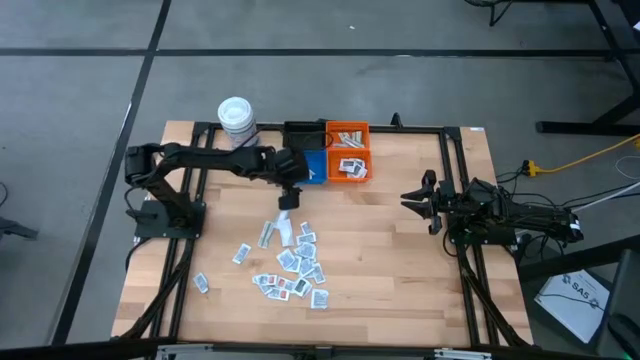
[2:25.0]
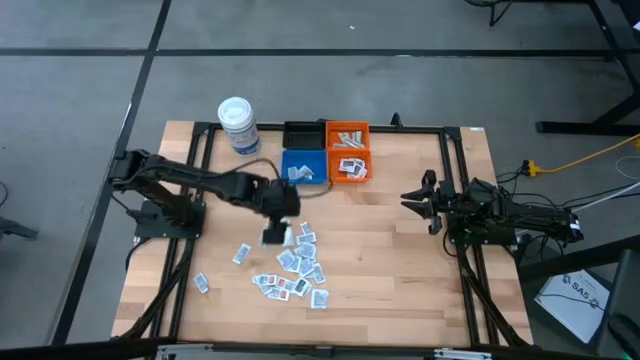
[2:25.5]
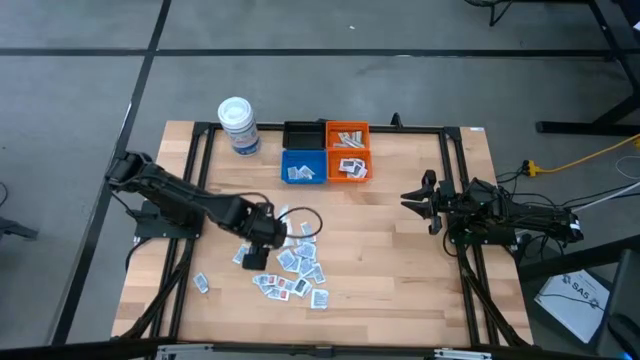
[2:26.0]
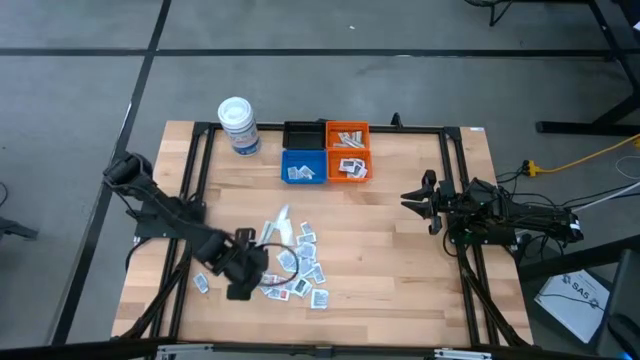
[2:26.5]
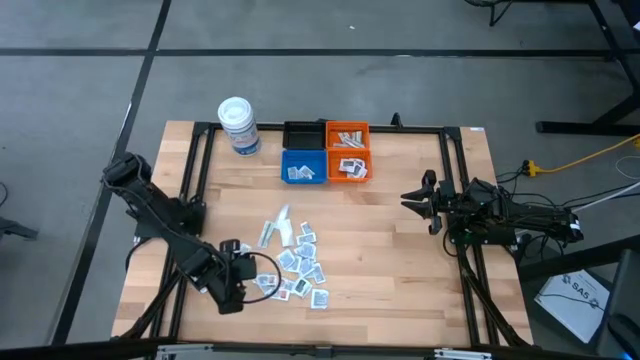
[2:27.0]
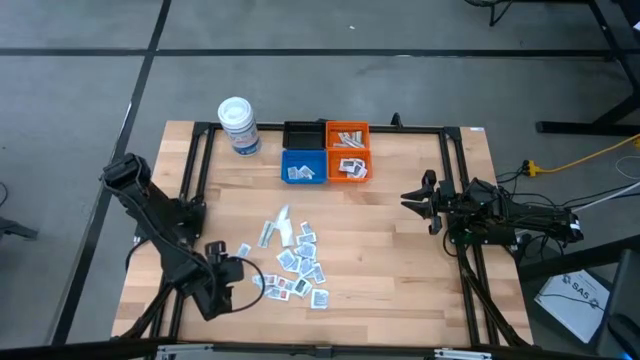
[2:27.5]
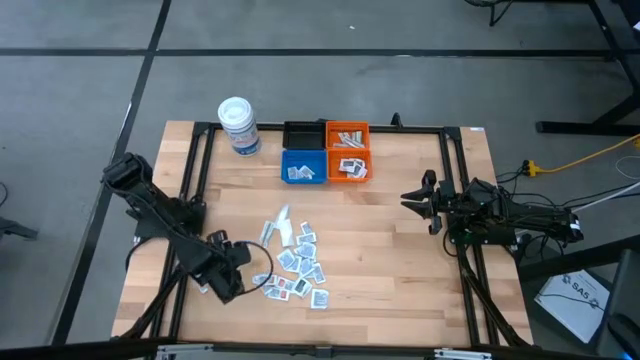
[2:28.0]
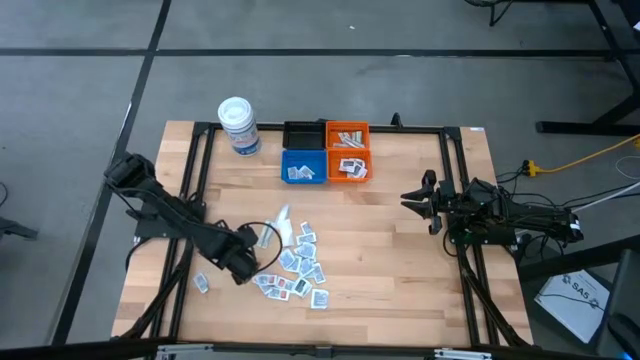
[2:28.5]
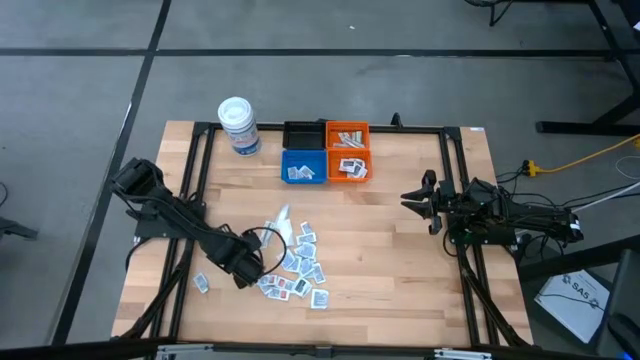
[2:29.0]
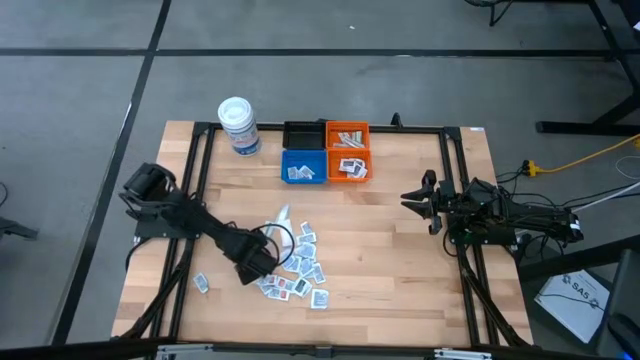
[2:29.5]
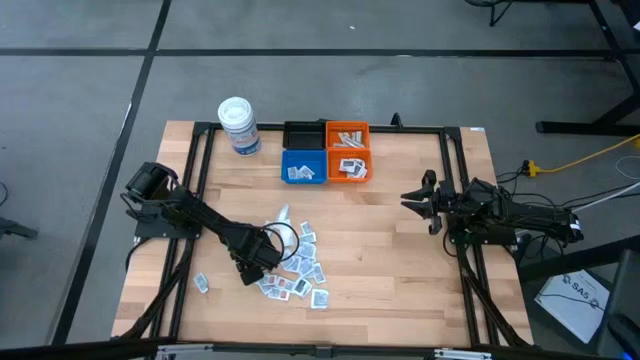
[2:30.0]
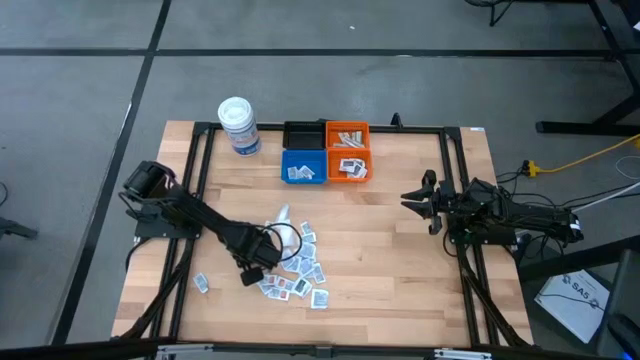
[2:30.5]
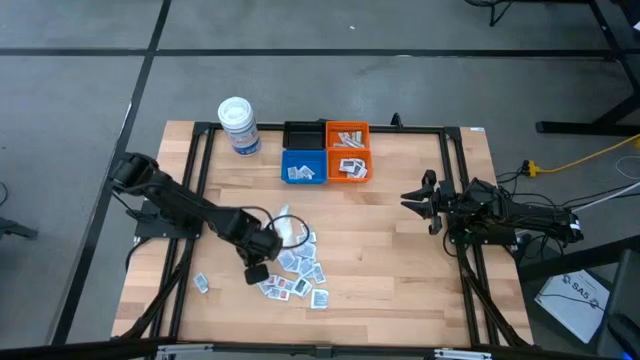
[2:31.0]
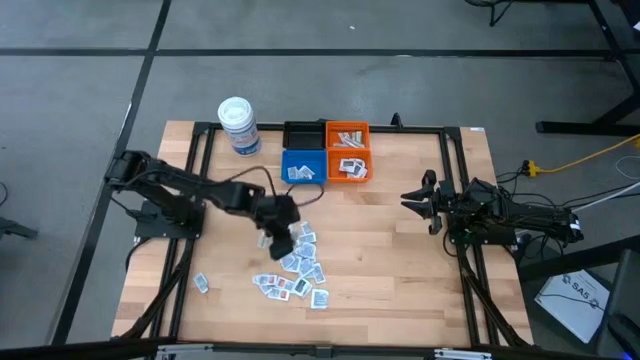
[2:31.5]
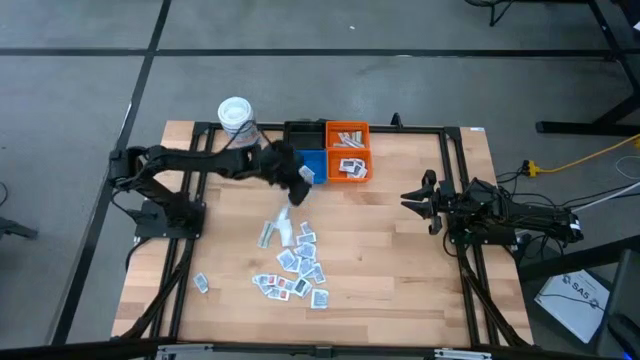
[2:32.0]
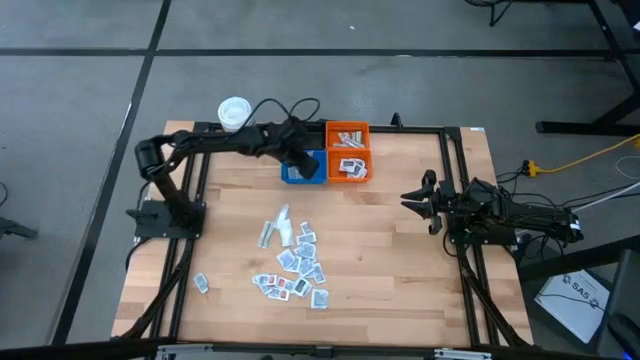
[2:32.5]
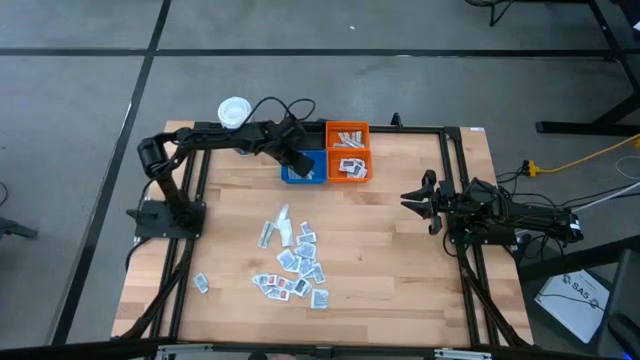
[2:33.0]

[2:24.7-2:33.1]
Task: Pick & Place First Aid Supplies
Put the ointment pack into the blue bin

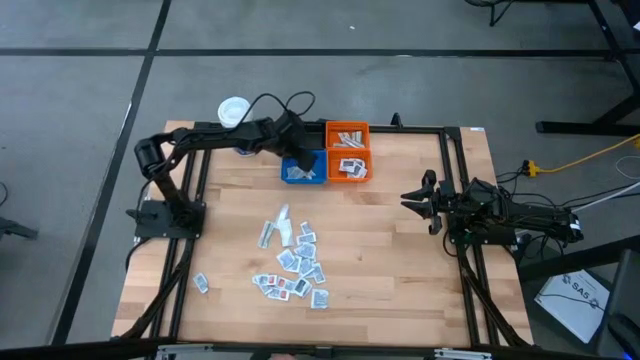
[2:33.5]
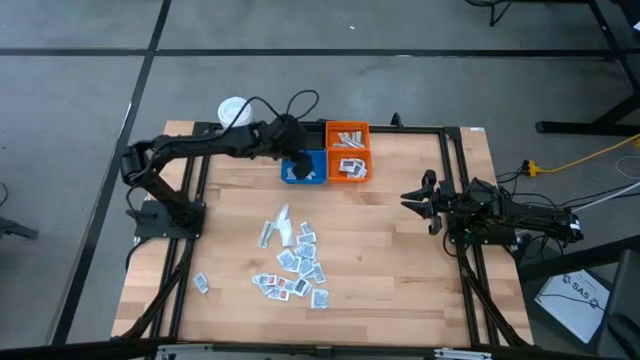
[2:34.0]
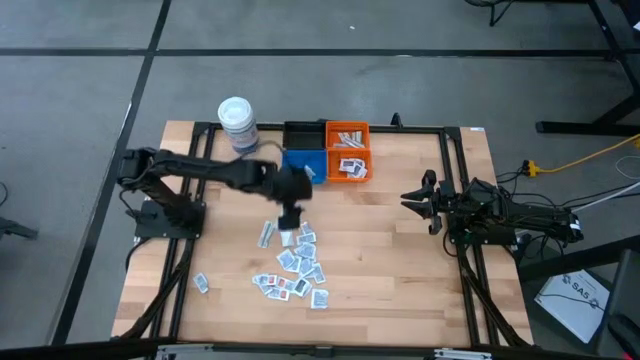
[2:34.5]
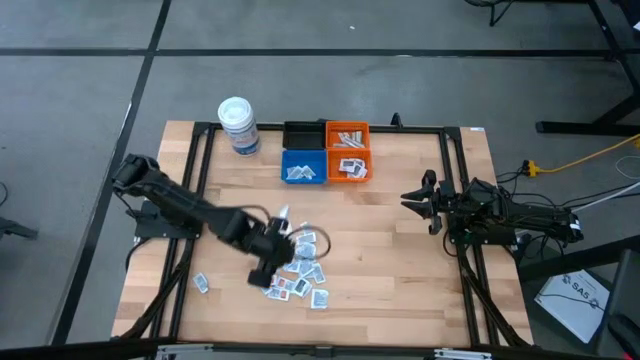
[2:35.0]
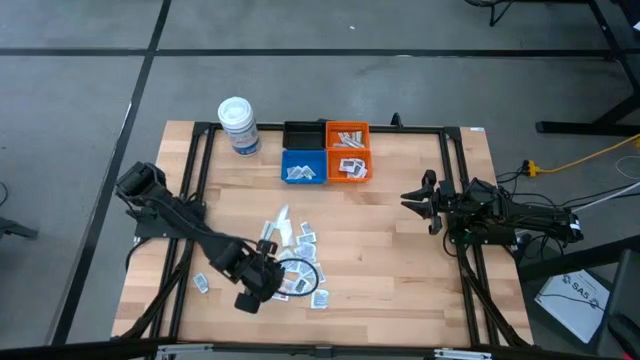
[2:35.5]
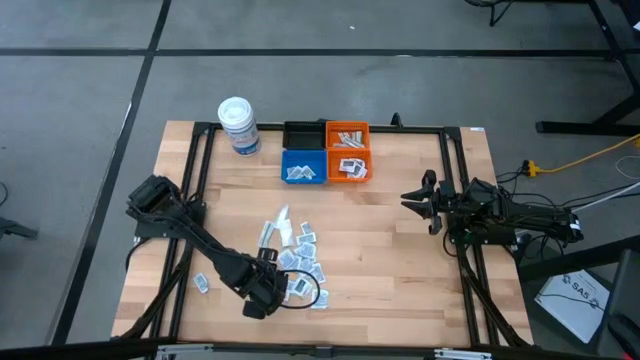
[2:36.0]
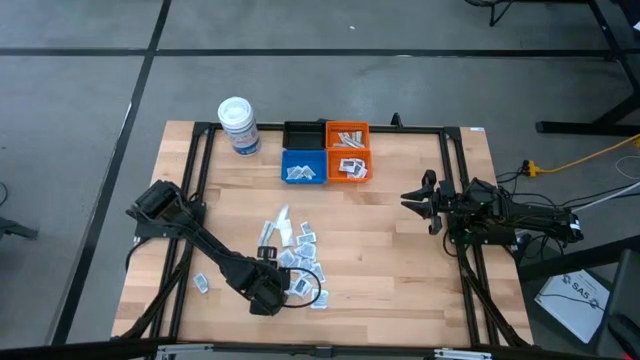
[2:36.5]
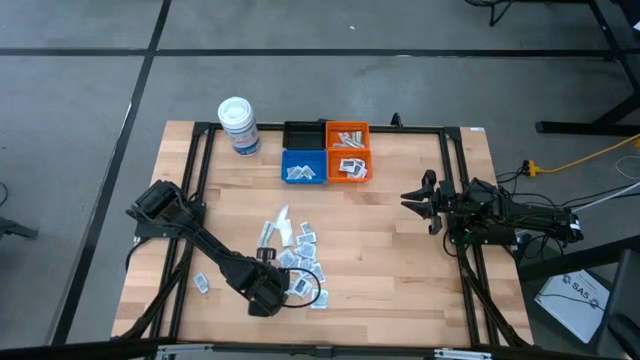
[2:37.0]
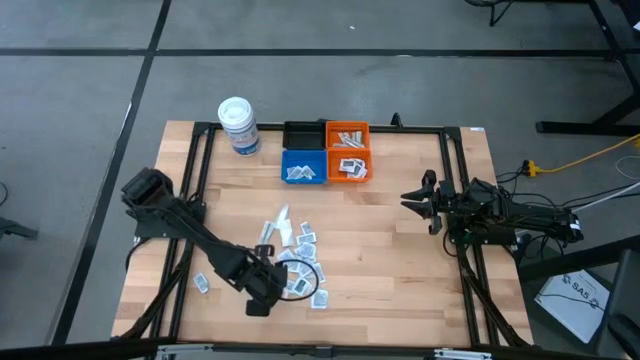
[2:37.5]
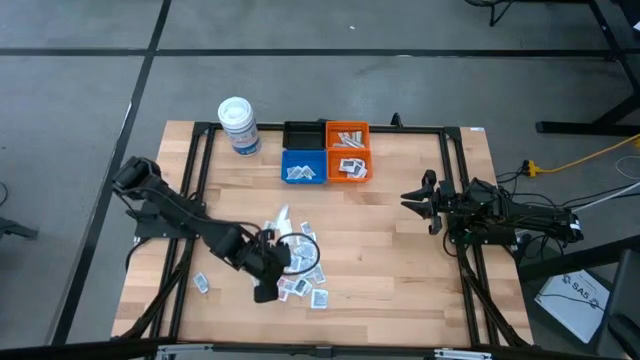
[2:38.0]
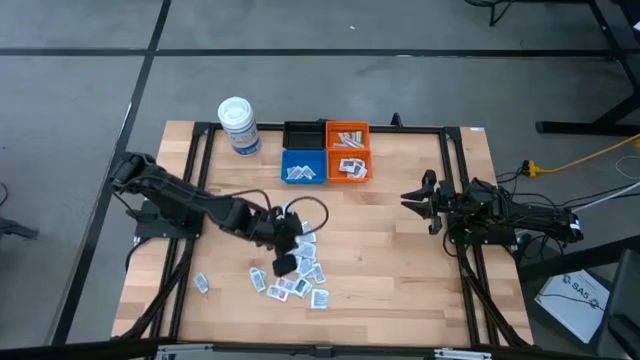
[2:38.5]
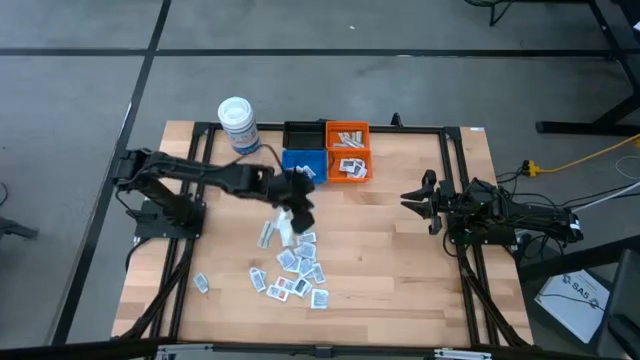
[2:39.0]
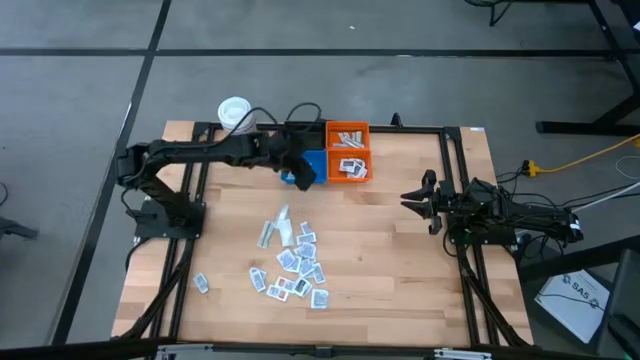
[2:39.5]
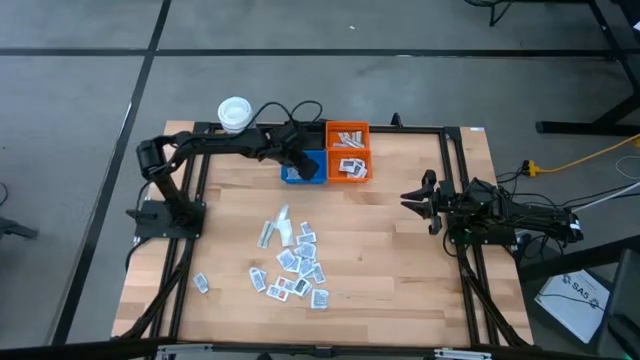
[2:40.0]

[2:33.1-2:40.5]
Put the ointment pack into the blue bin

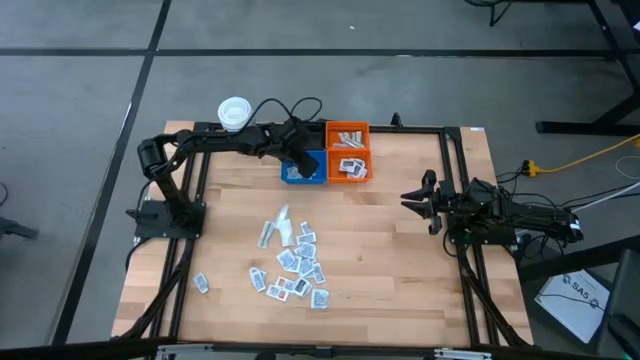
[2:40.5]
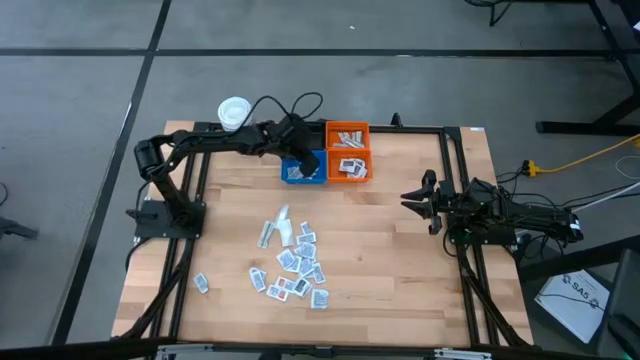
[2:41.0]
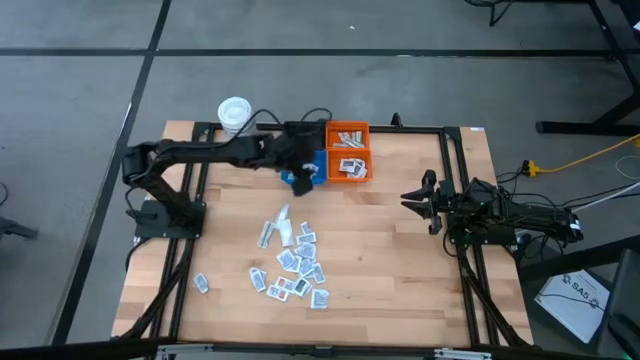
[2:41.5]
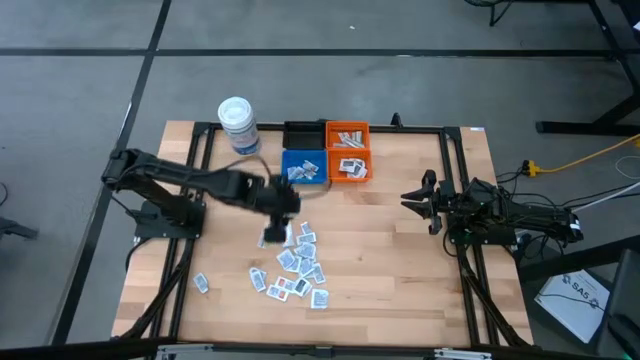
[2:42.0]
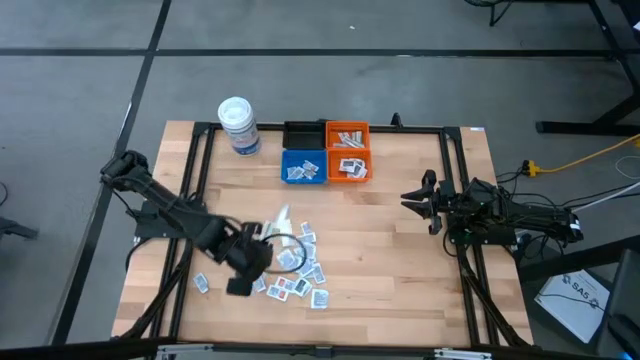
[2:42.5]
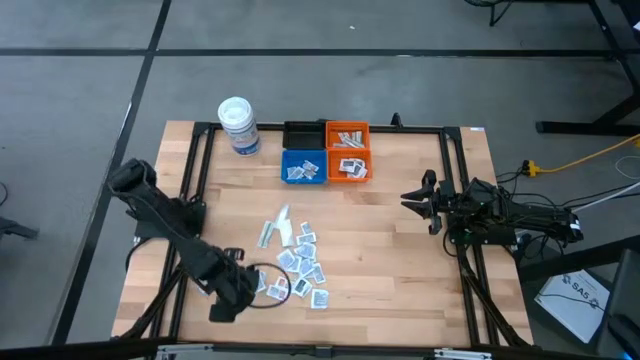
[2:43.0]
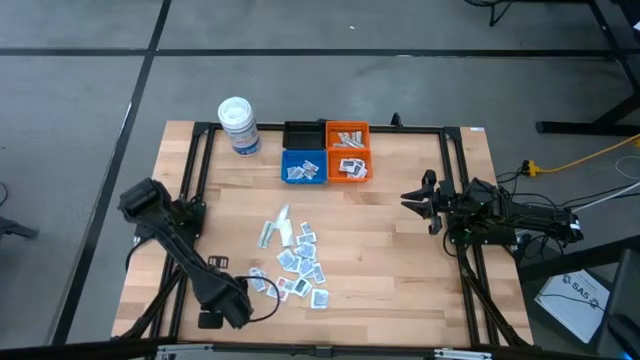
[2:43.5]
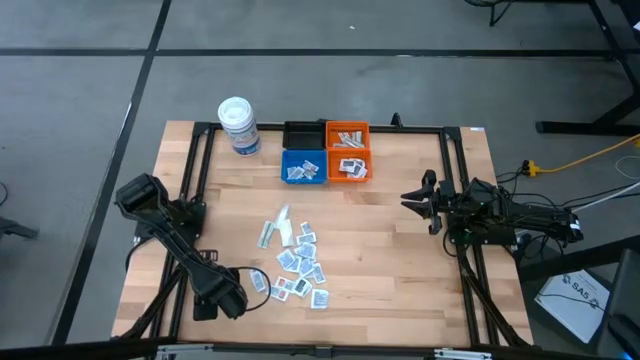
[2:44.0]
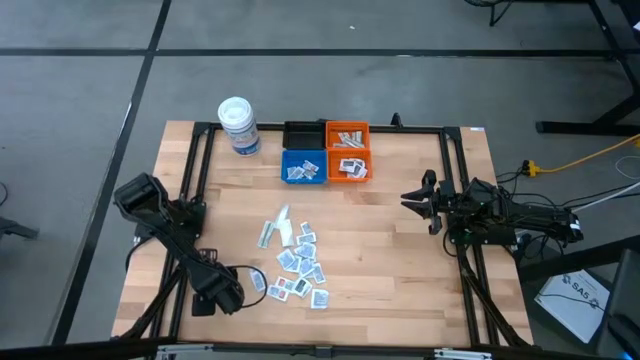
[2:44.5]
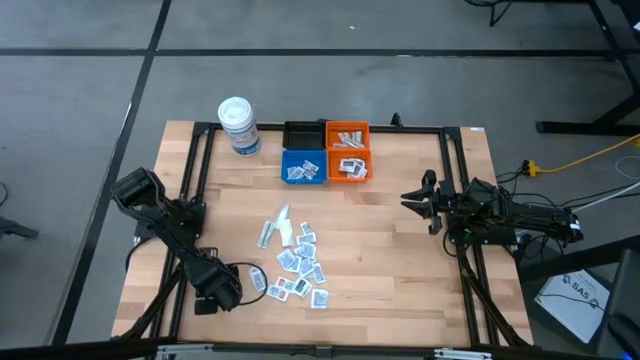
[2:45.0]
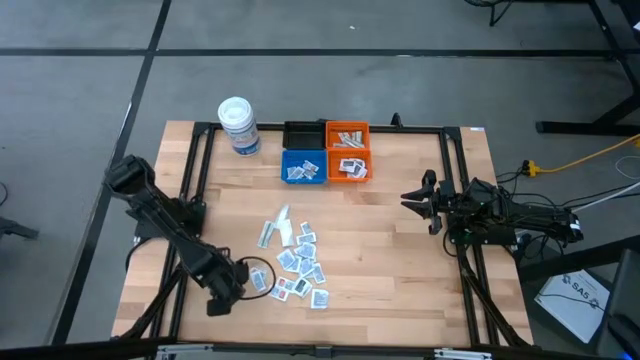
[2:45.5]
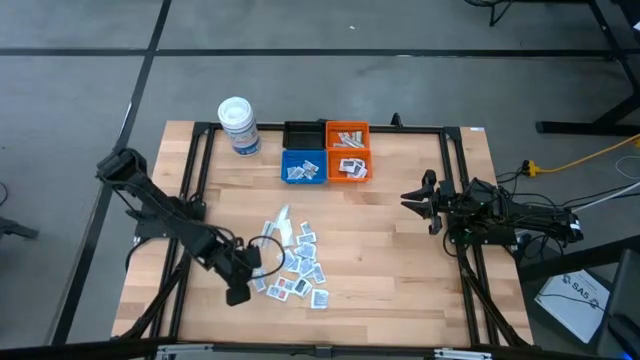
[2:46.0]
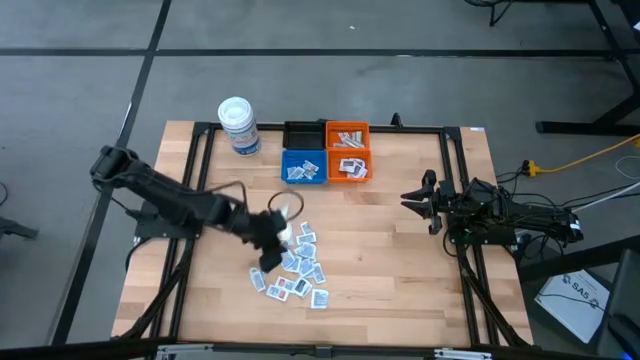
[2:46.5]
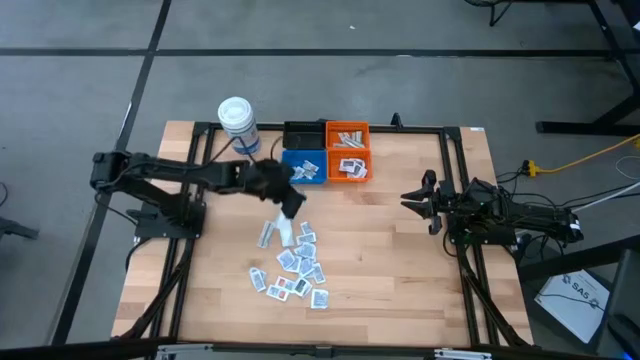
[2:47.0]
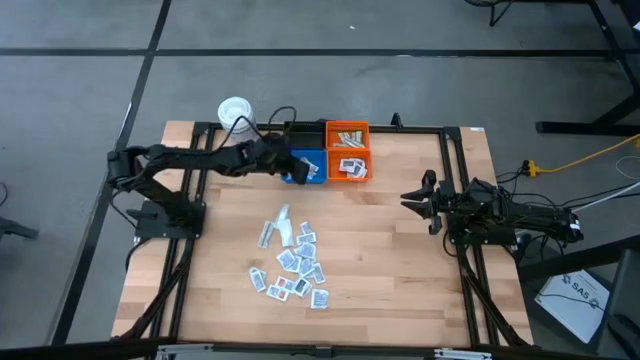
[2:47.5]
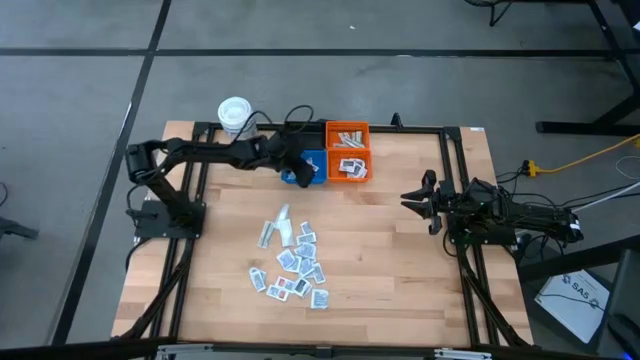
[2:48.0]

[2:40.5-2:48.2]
Put the ointment pack into the blue bin
